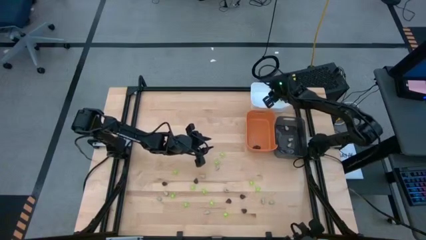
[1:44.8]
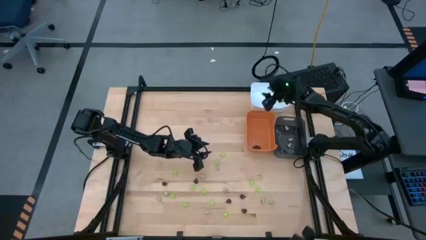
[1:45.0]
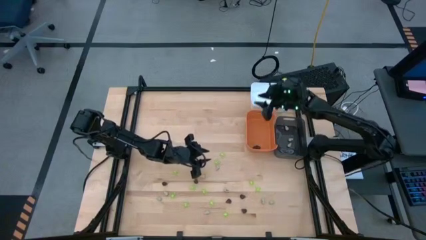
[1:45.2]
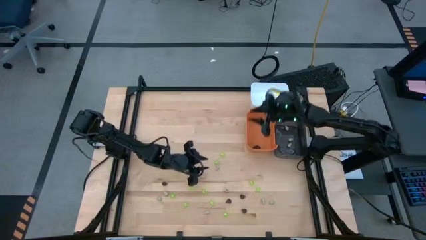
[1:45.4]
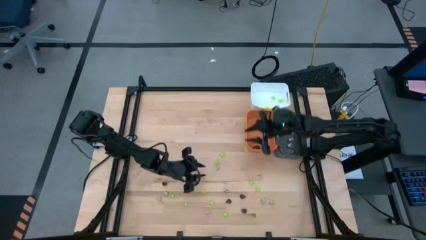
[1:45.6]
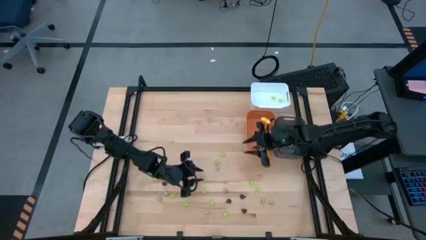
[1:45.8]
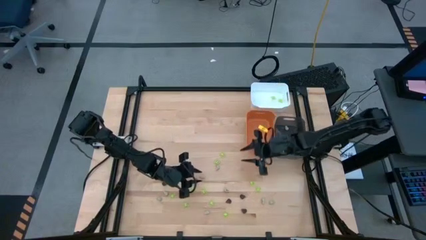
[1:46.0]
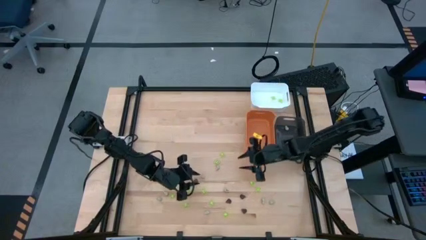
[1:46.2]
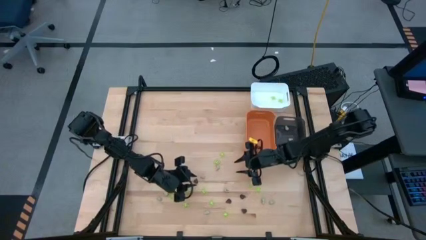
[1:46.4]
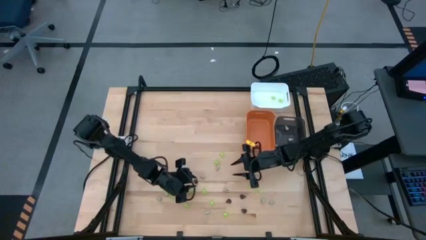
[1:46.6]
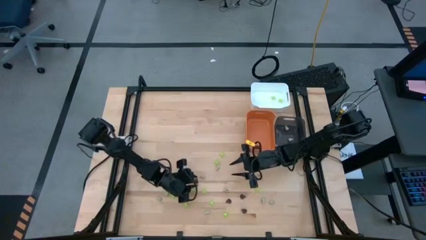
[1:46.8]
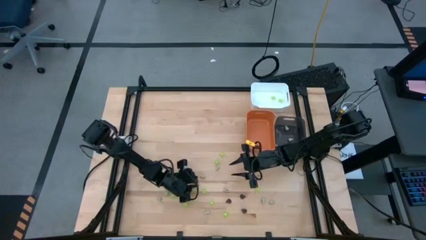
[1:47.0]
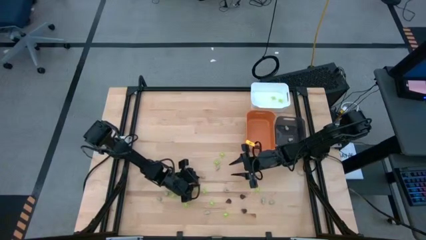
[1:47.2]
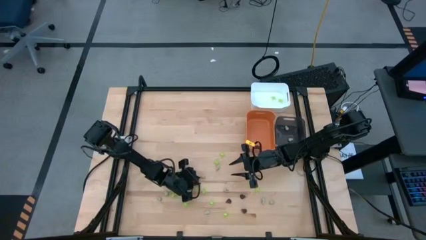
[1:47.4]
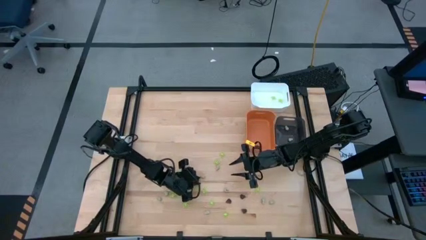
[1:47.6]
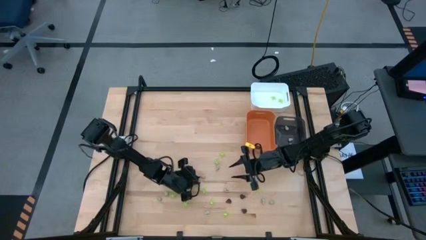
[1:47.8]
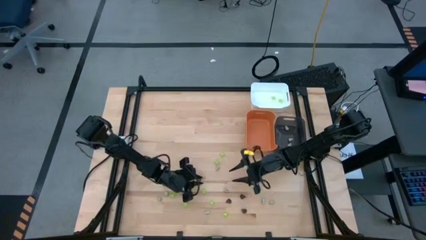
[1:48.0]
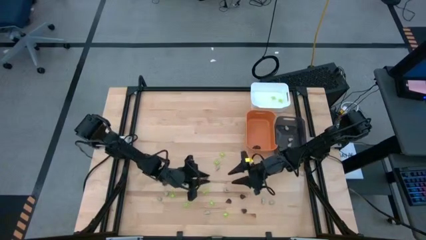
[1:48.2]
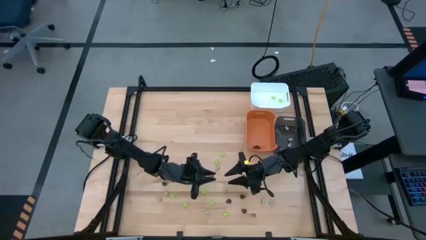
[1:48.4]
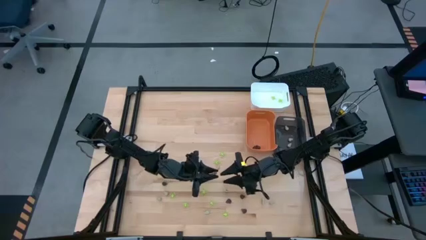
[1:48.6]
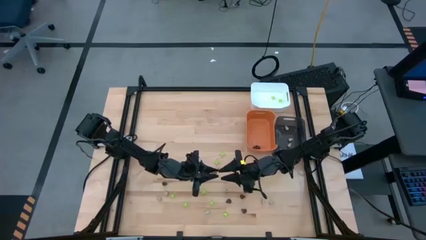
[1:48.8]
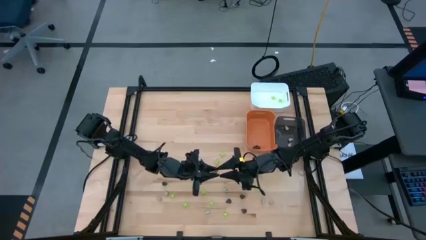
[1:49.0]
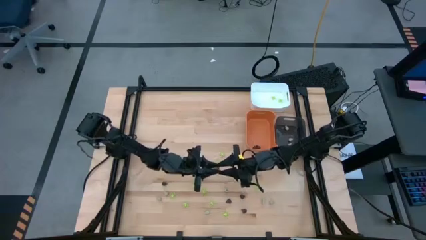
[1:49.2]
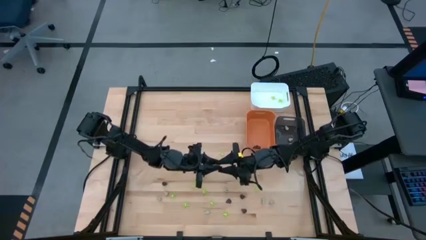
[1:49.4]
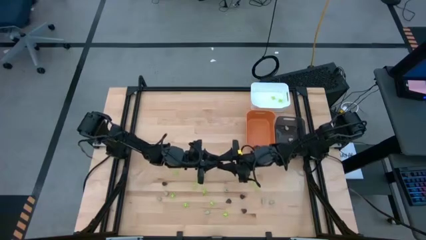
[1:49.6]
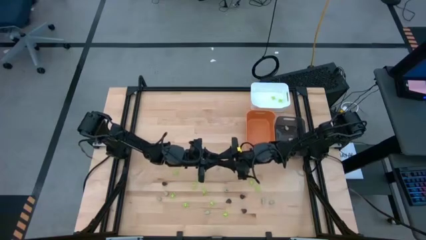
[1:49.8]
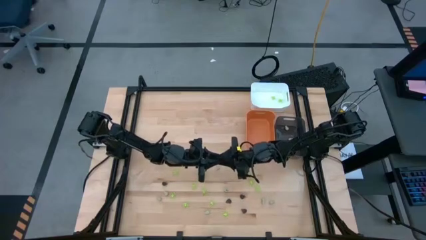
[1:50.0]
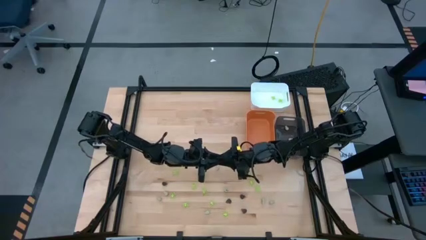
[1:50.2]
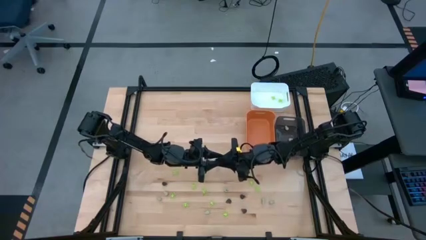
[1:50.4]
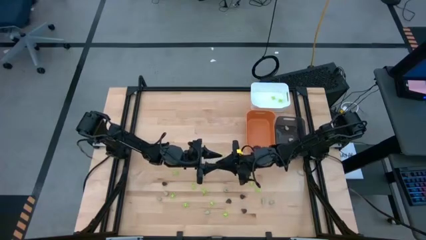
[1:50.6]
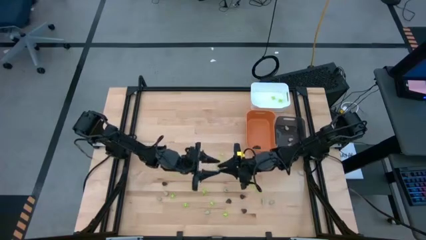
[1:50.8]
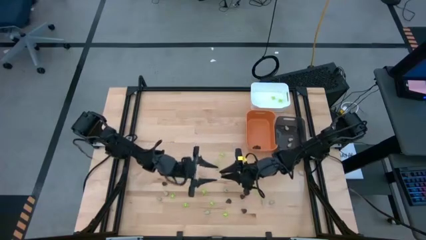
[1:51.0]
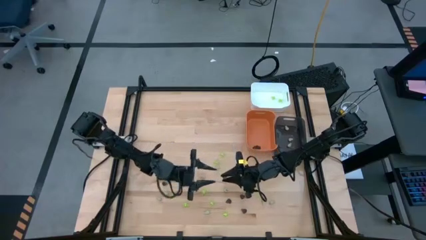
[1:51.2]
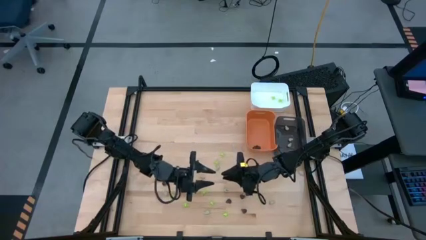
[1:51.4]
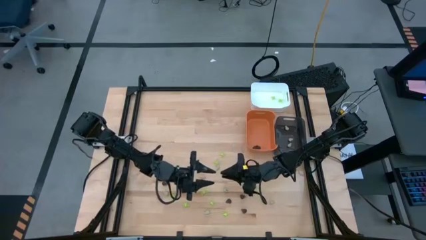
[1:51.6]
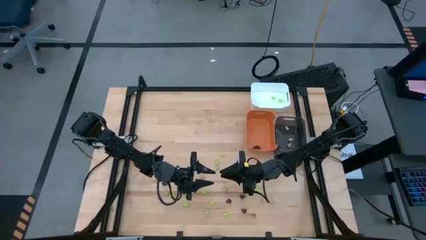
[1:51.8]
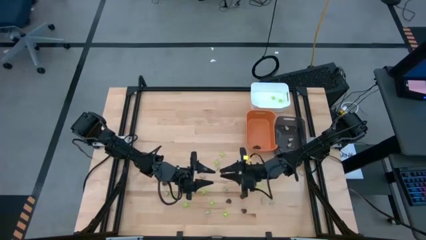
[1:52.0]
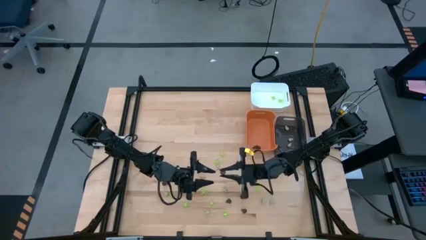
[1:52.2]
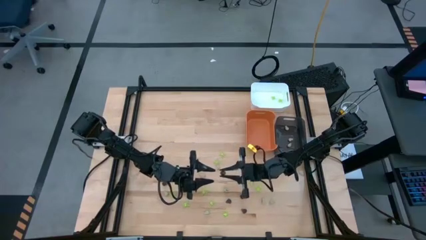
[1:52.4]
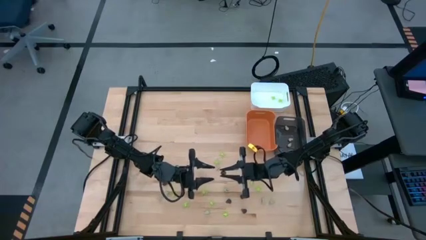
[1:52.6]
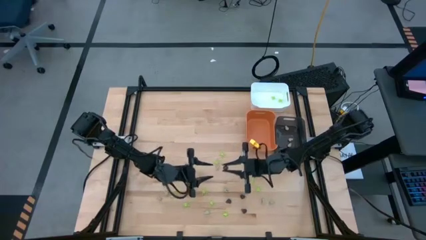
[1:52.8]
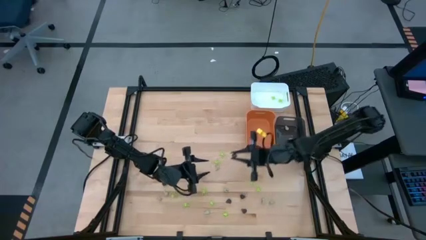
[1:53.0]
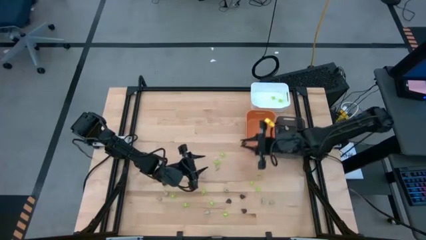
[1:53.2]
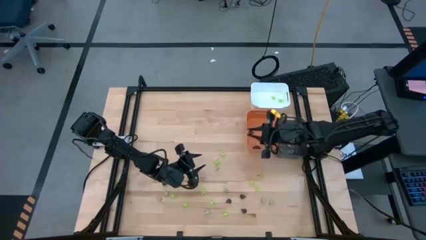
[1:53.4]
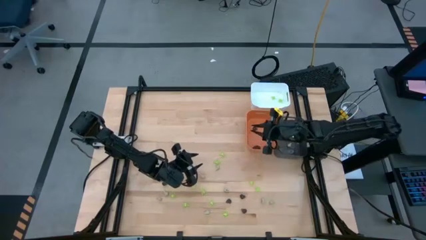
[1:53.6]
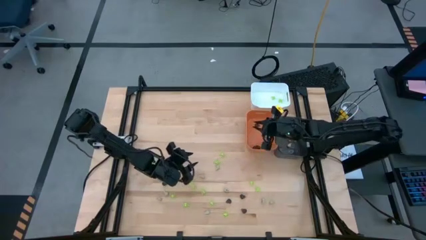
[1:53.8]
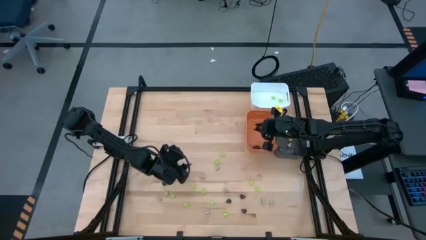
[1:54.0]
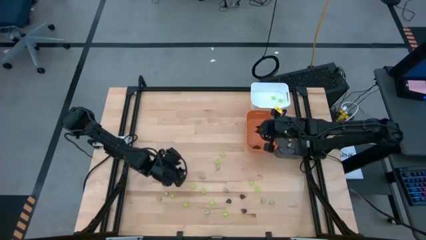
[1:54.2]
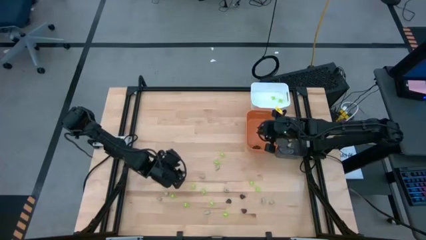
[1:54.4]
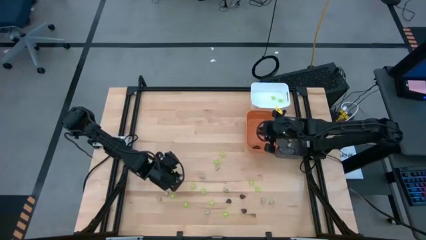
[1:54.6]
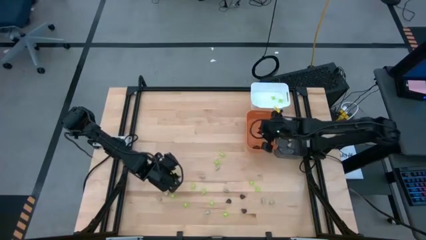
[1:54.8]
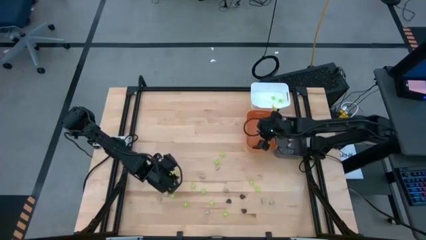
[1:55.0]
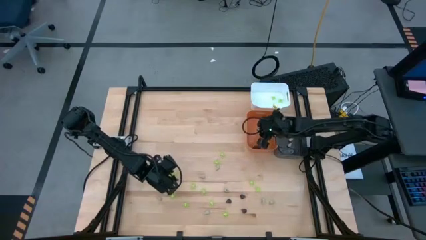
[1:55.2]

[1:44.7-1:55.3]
Task: Sort Halloween decoration
Put the black skull toy into the orange bin

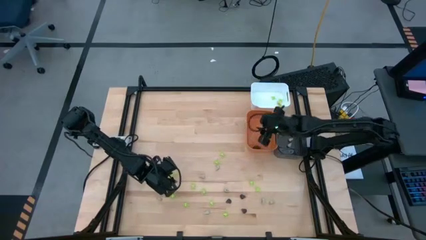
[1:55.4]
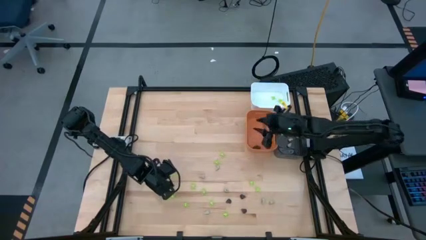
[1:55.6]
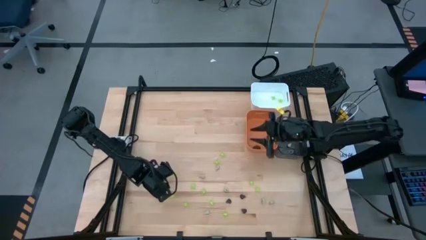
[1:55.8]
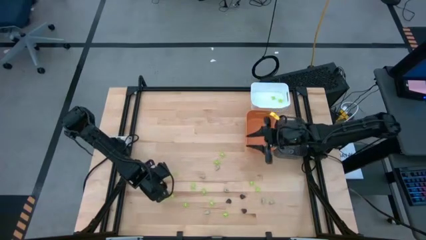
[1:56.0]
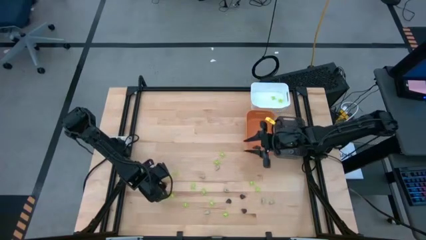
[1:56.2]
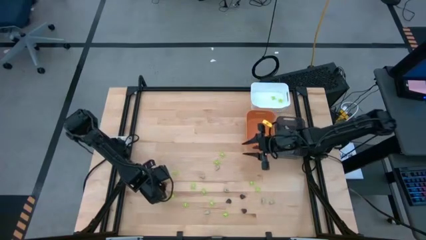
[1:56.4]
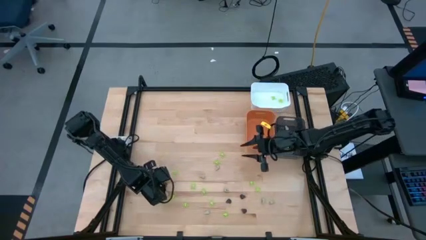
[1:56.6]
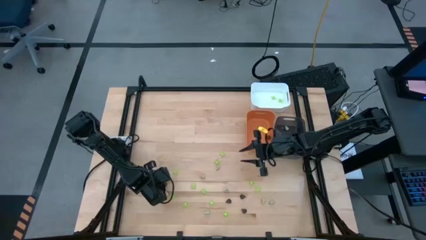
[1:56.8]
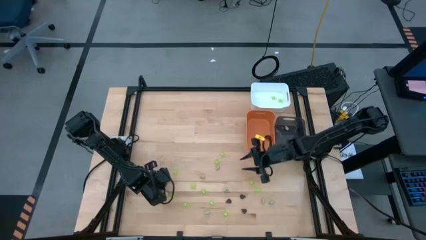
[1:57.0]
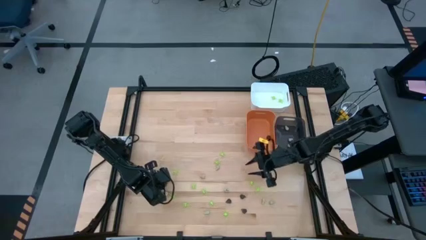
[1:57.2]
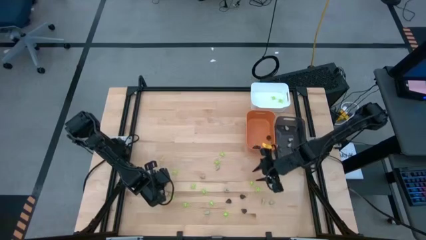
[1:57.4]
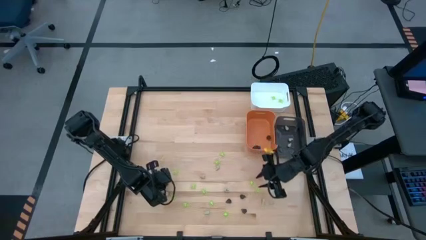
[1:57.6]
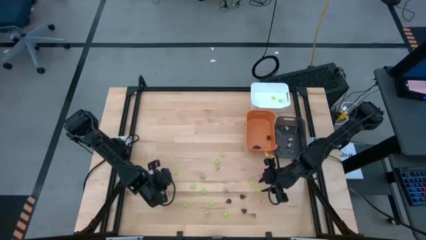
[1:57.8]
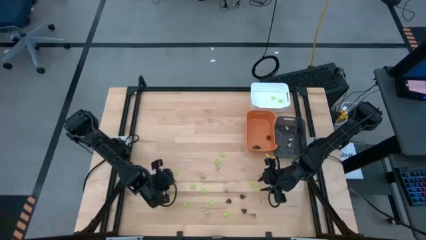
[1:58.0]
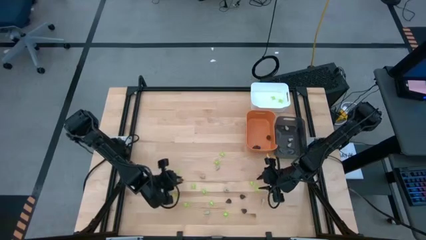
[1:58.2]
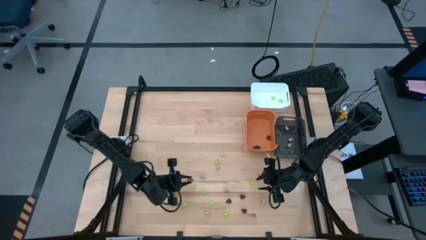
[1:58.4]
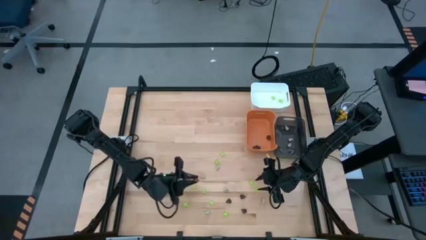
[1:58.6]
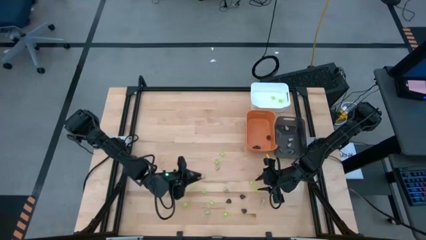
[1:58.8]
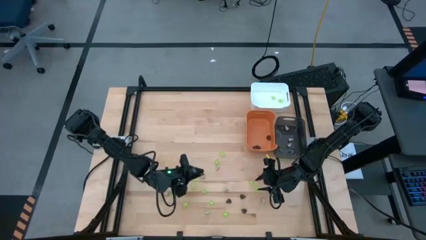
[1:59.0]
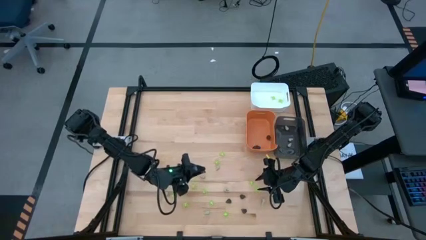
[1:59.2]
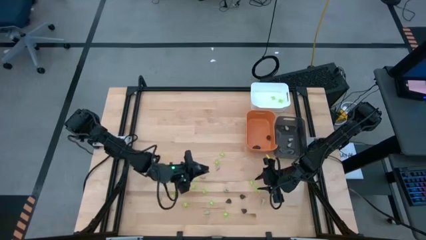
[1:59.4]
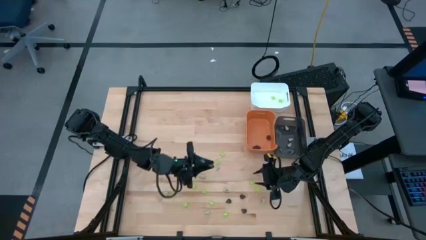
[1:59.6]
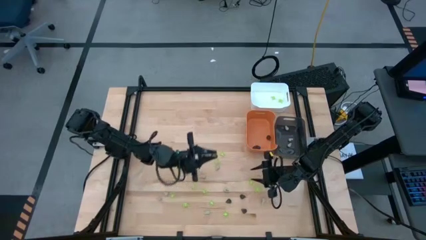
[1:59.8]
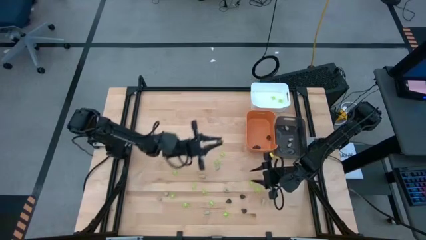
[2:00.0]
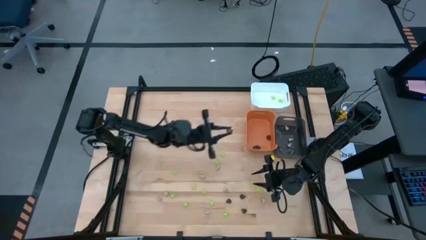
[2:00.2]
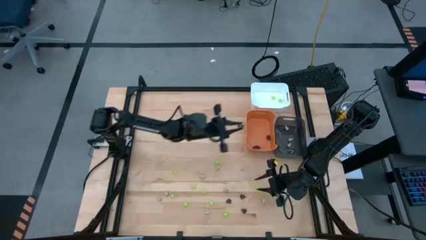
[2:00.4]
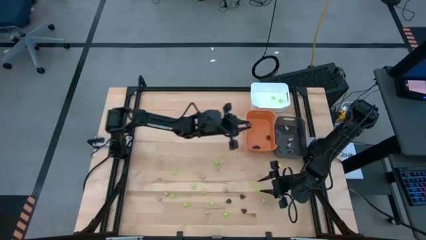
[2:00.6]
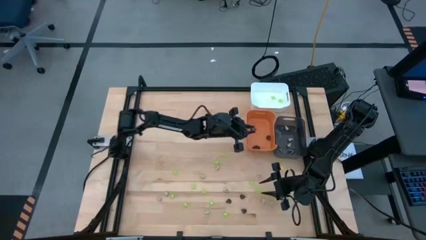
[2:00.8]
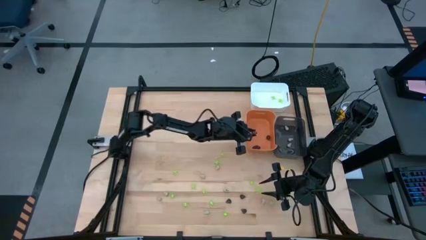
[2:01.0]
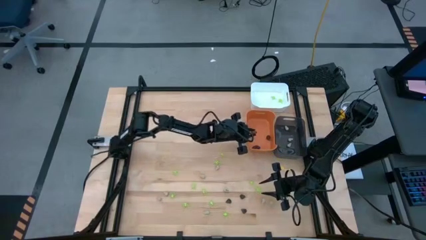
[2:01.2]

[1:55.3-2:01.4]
Put the black skull toy into the orange bin
